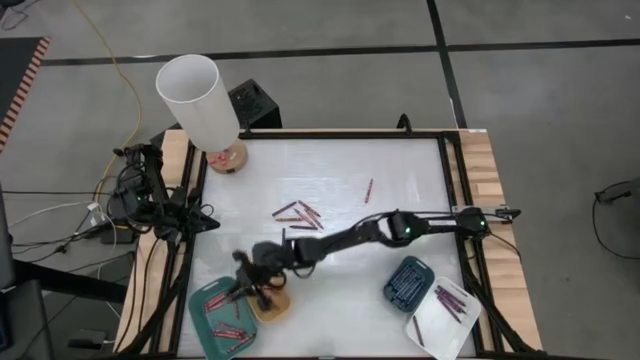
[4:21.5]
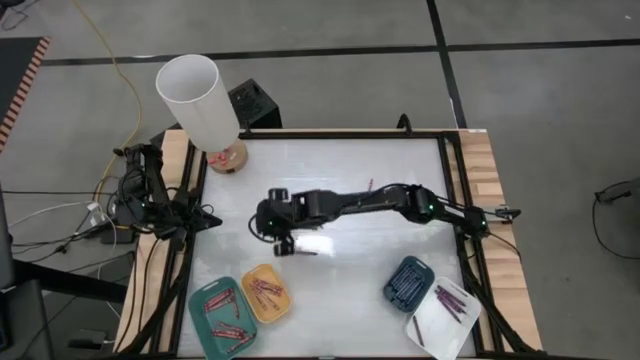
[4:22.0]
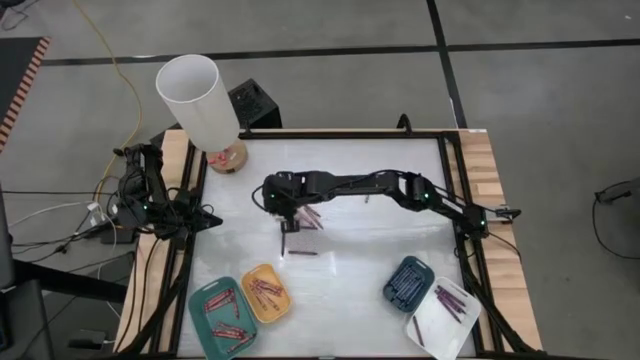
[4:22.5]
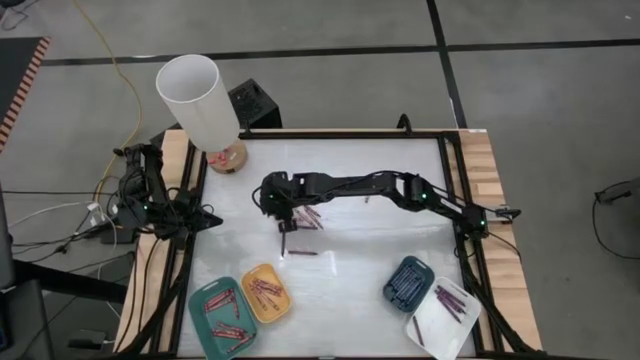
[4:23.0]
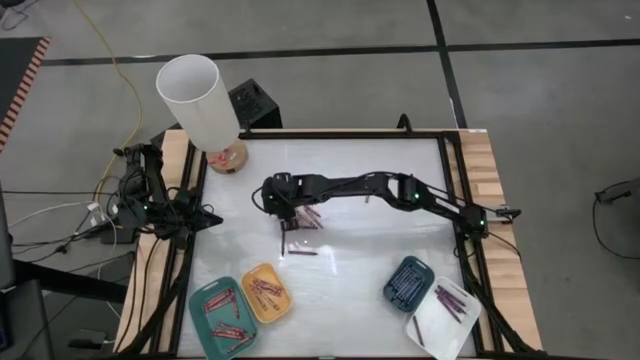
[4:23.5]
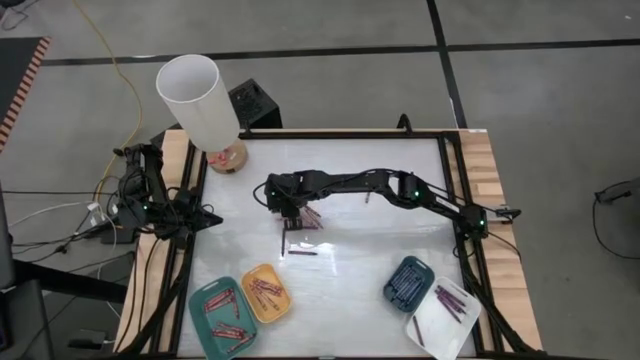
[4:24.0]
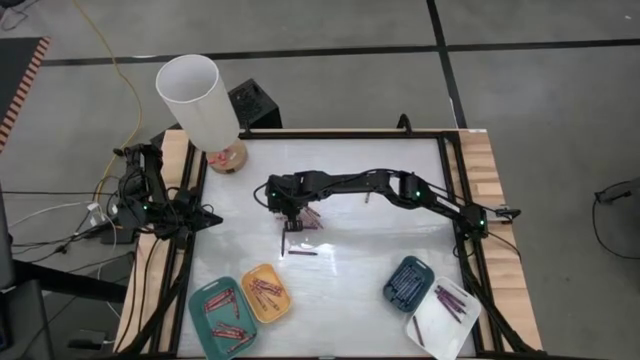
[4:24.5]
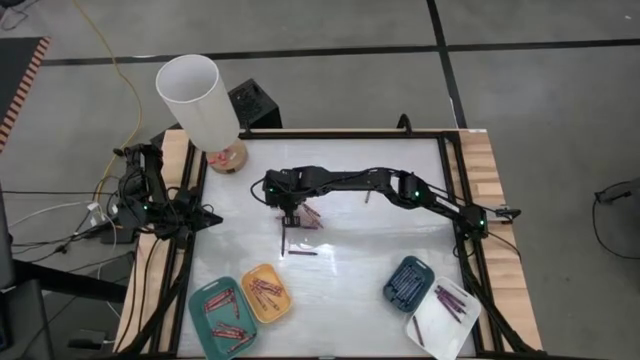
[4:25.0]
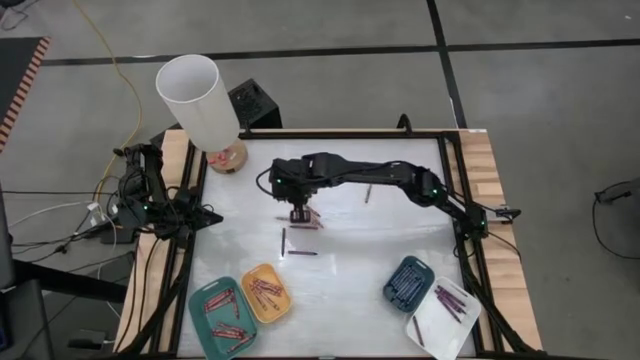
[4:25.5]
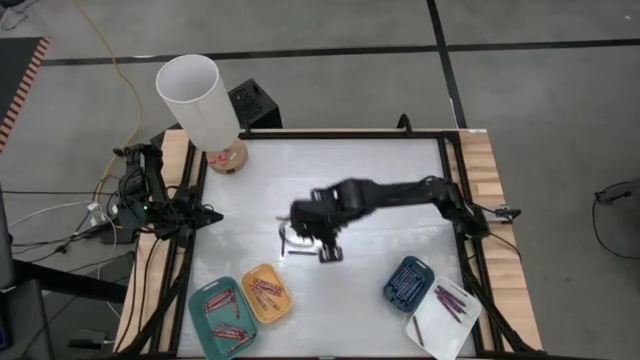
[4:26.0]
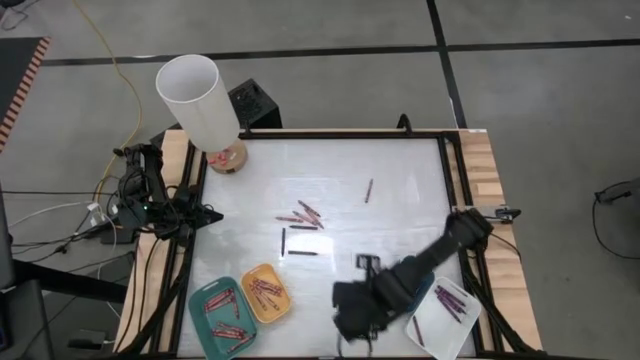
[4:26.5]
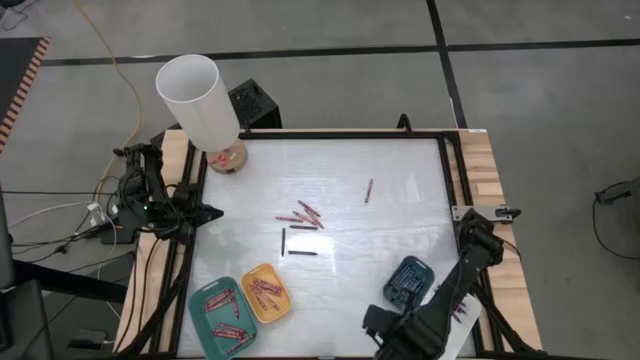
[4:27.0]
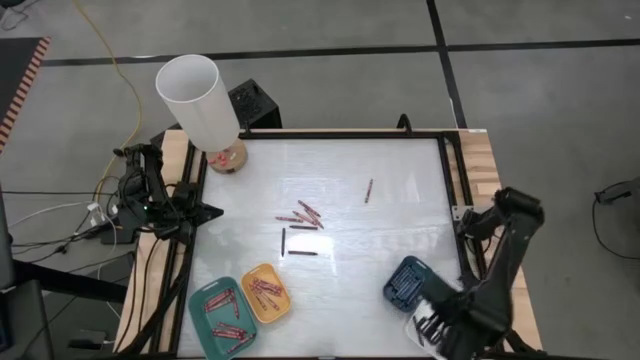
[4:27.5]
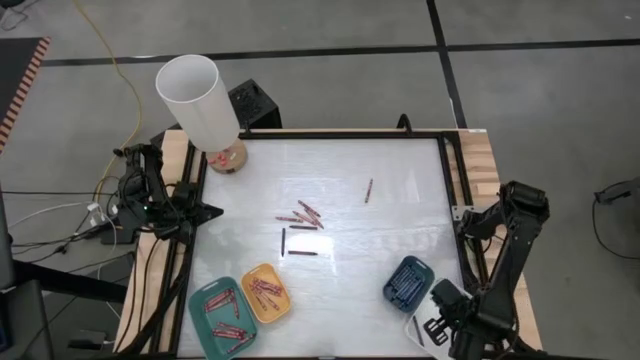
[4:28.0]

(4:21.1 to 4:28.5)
Task: Sort crayons
Put the purple crayon into the white bin

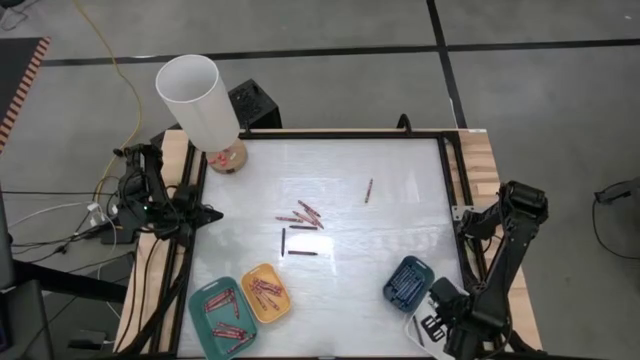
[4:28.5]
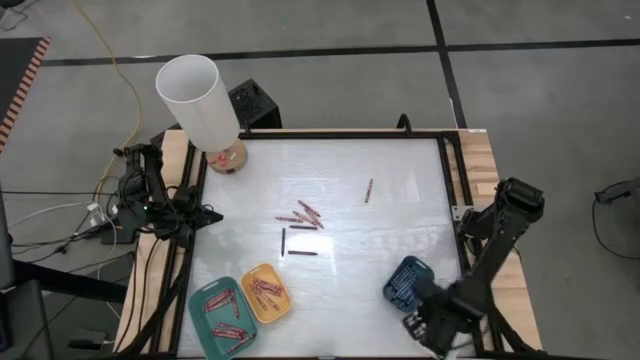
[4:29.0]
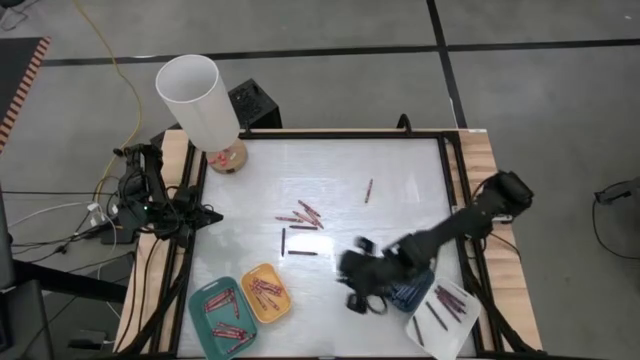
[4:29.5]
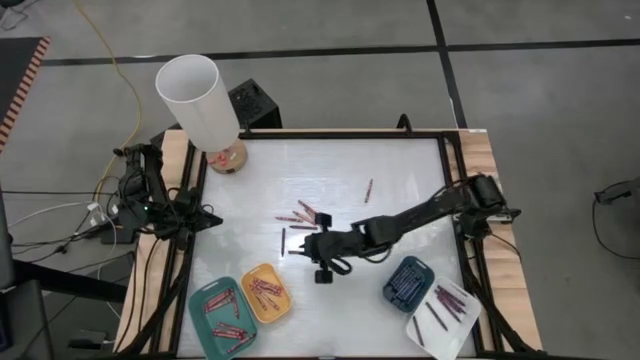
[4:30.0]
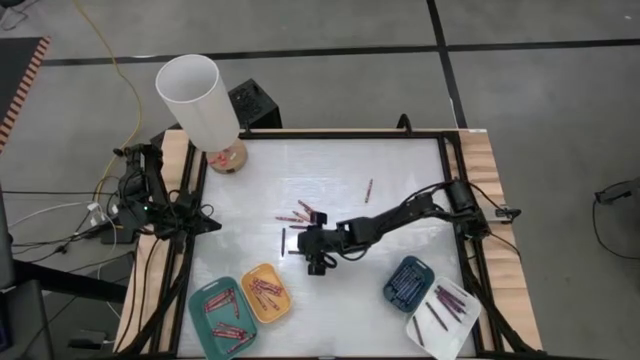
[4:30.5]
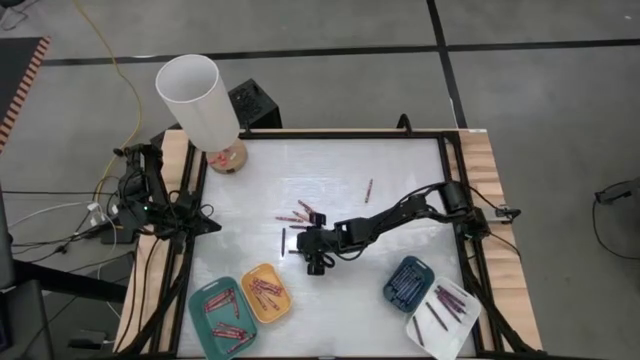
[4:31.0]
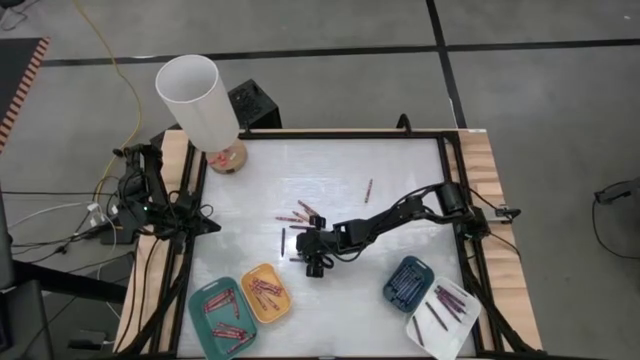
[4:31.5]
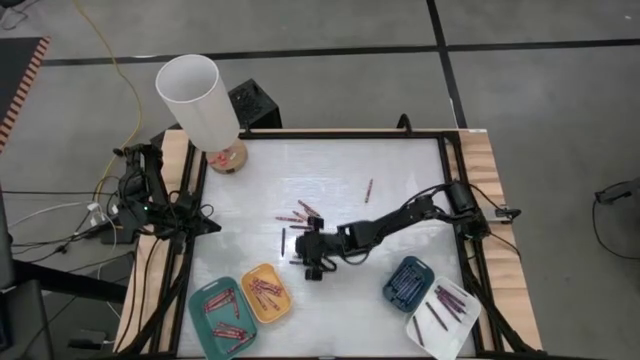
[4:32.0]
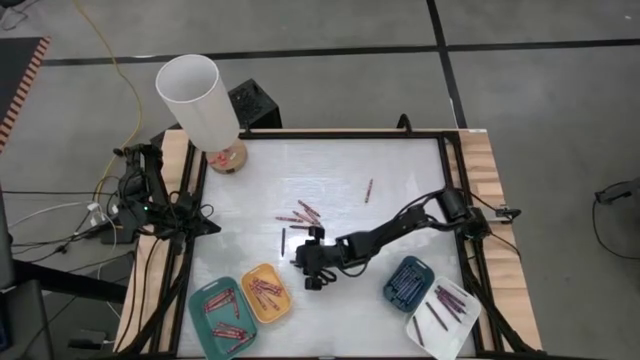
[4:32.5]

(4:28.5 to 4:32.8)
Put the purple crayon into the white bin

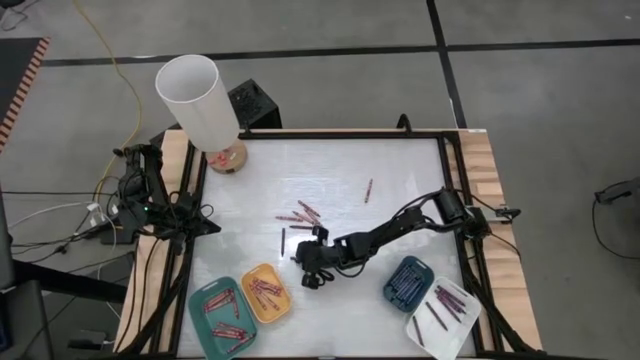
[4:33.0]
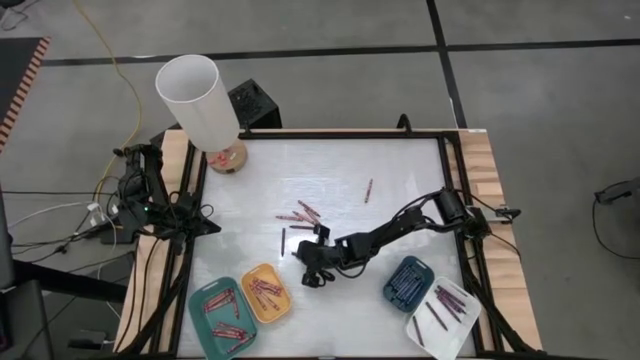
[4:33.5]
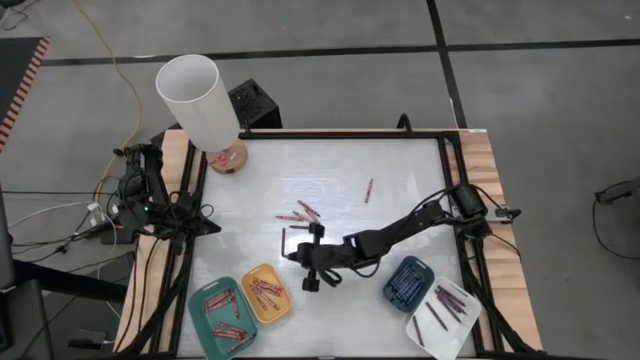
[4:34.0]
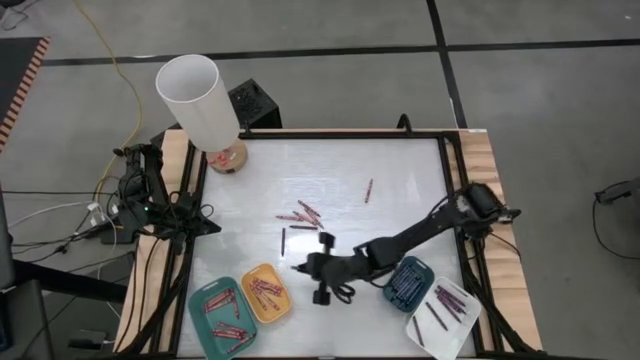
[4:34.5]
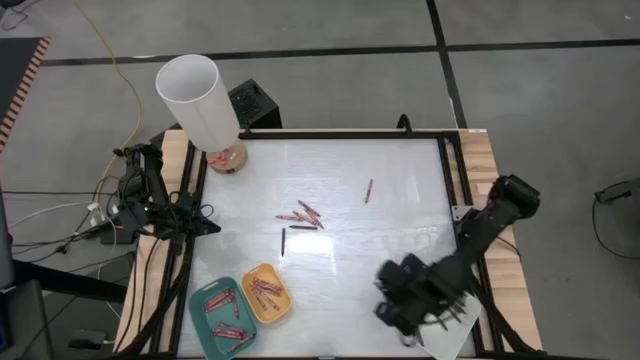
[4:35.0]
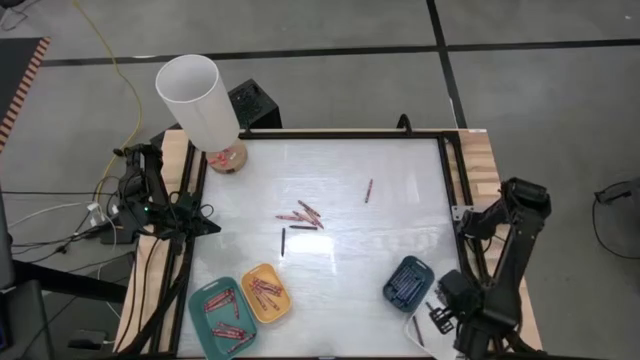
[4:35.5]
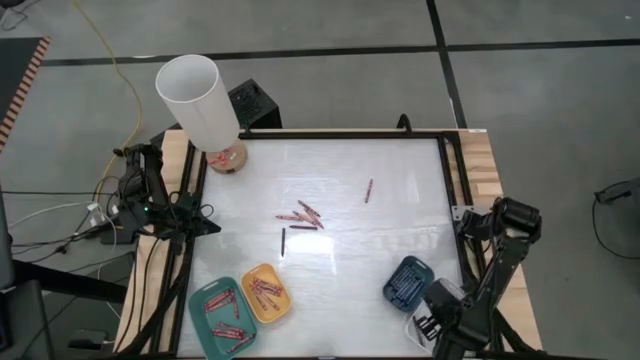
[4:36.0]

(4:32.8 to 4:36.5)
Put the purple crayon into the white bin

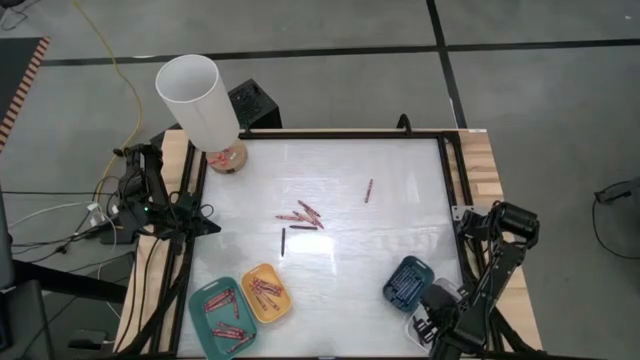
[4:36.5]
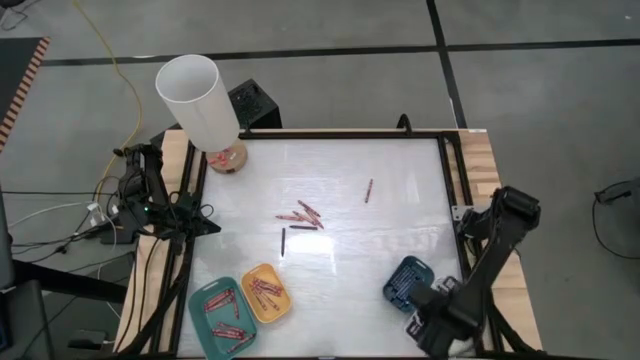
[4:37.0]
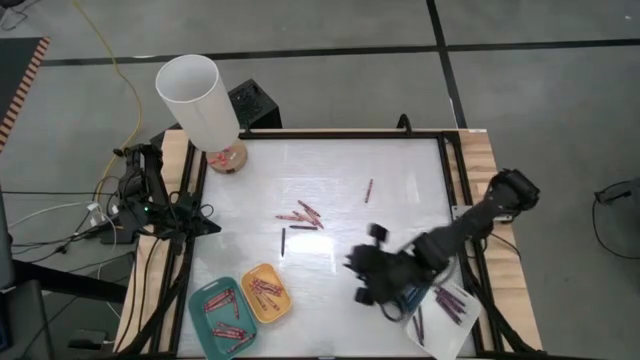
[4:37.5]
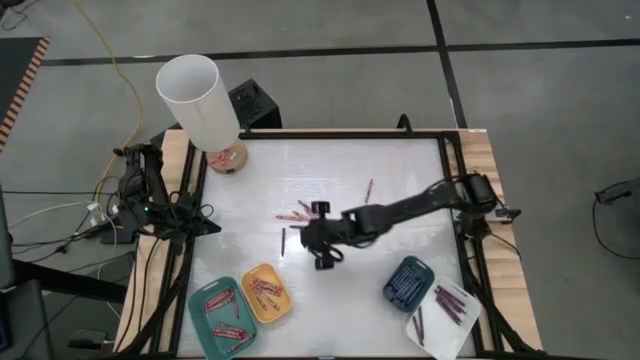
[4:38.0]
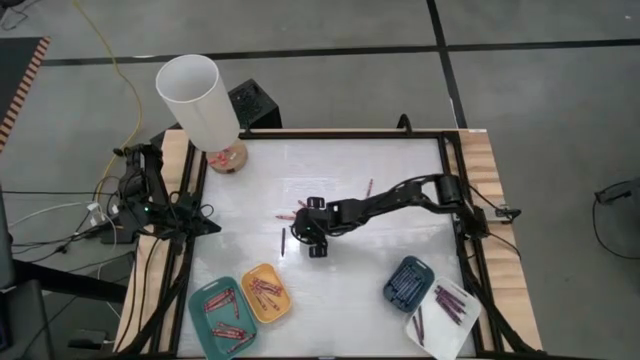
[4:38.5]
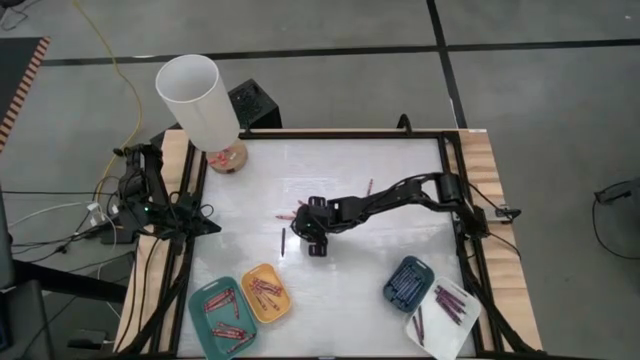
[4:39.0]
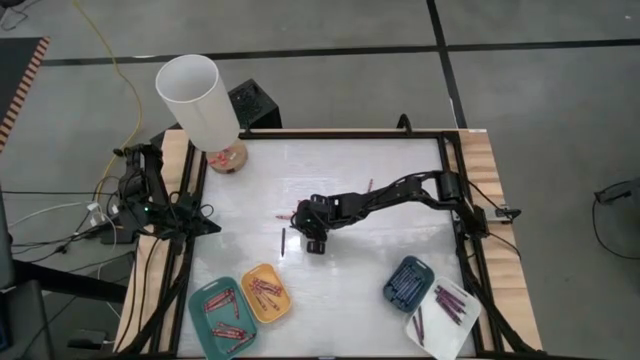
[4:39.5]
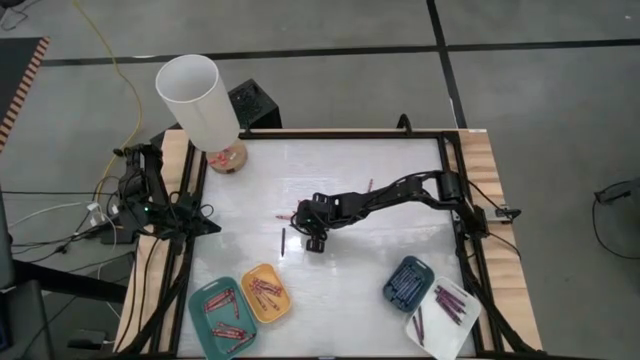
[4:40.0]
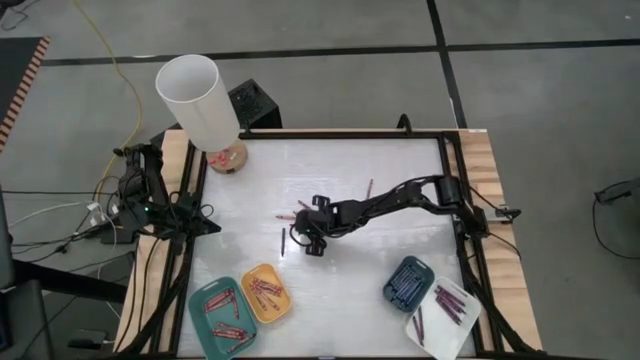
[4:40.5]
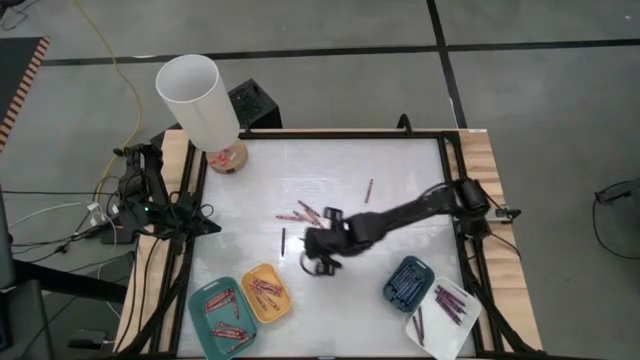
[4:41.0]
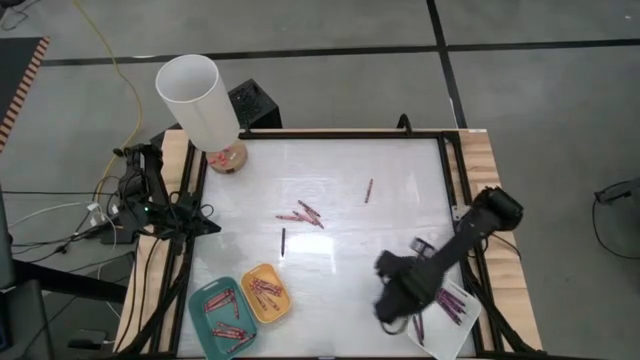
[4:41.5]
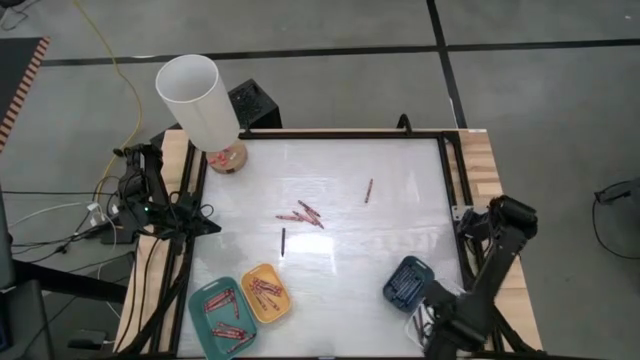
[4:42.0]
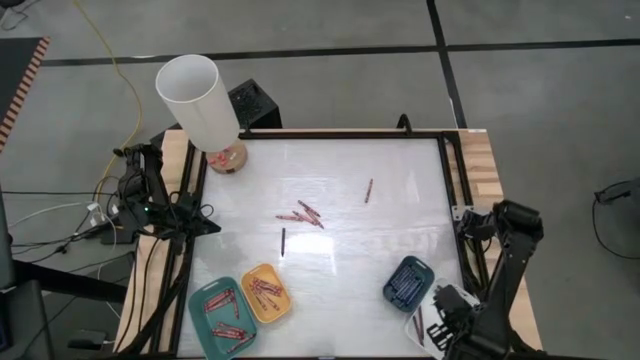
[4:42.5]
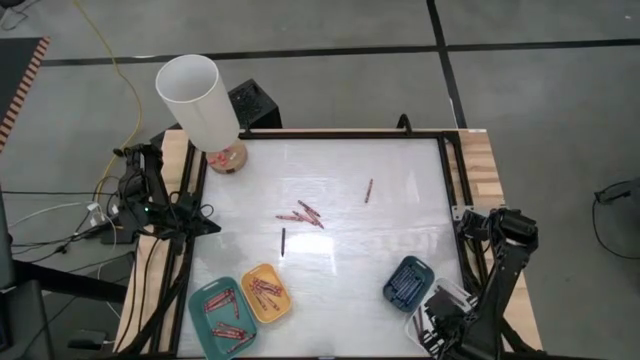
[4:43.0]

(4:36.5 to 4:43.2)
Put the purple crayon into the white bin
